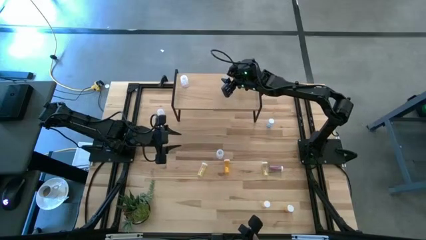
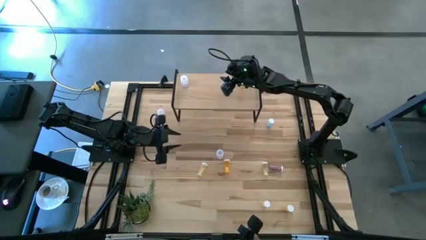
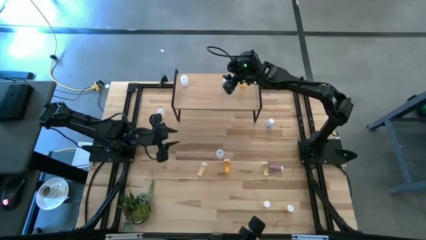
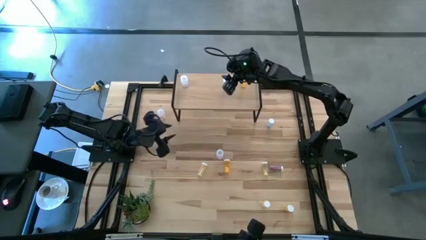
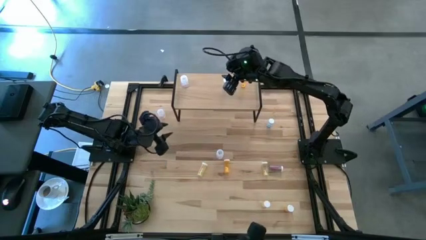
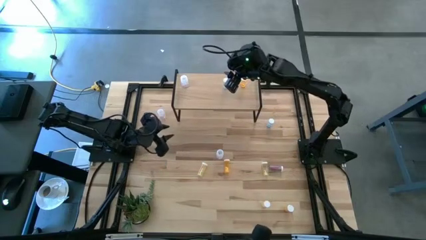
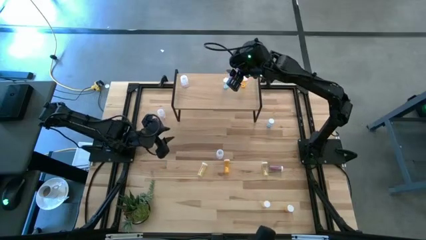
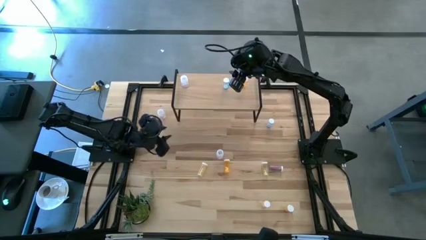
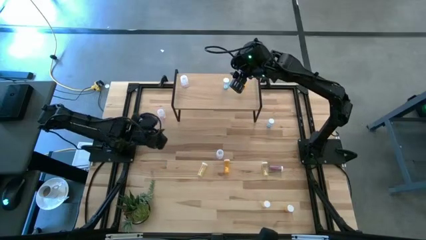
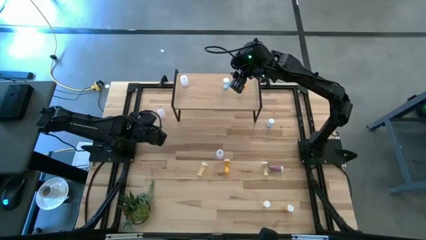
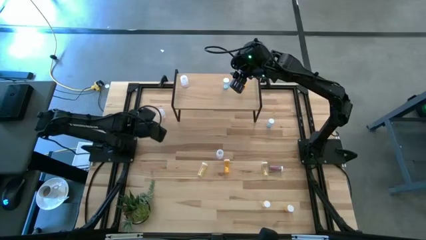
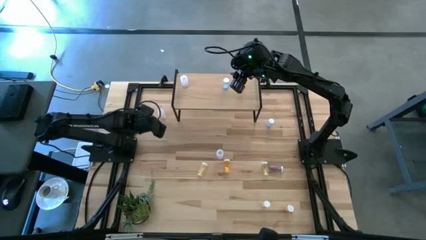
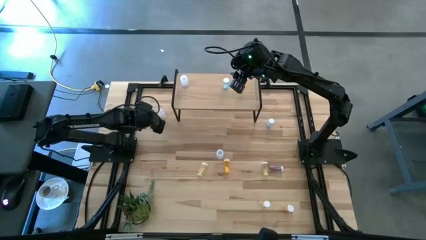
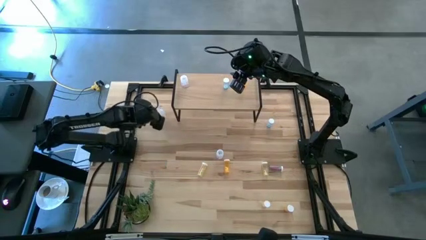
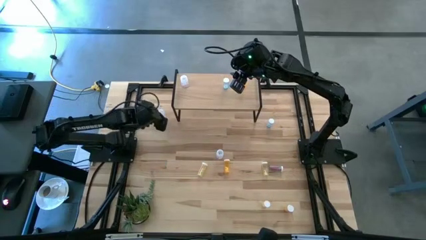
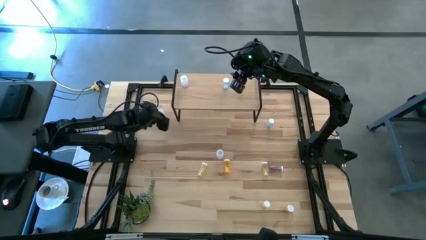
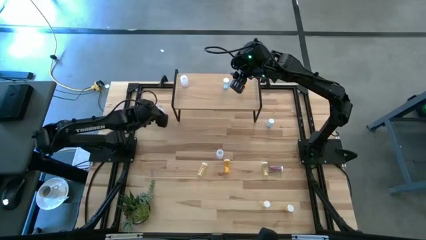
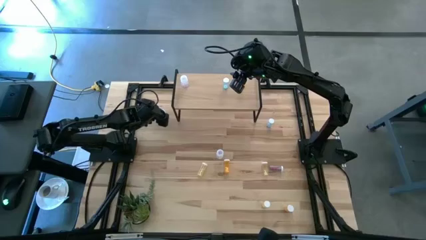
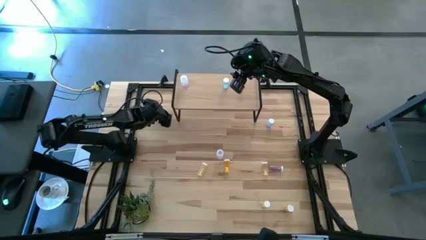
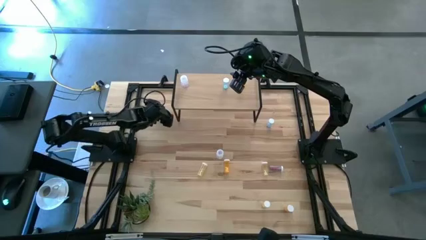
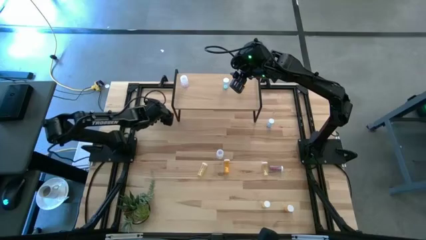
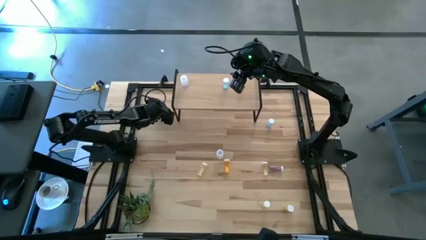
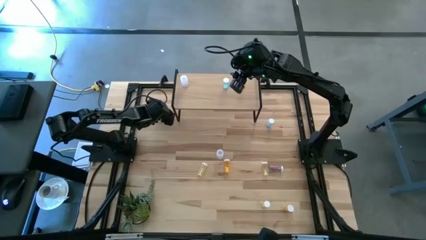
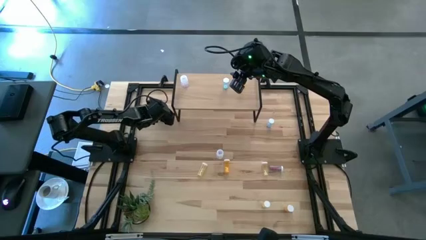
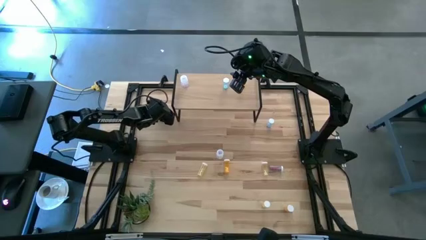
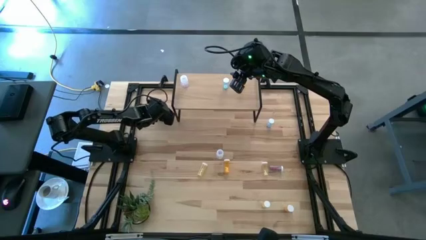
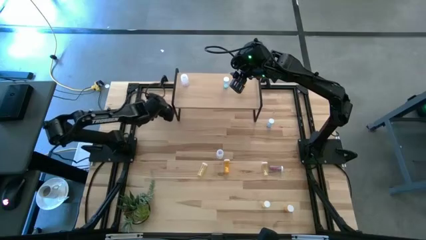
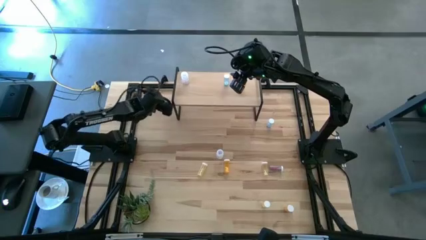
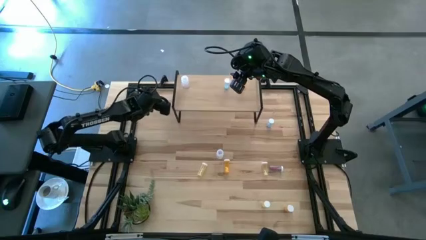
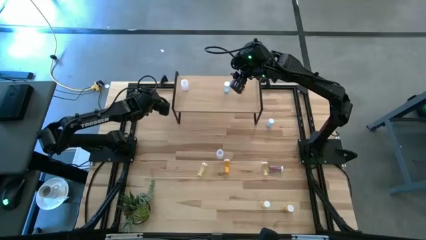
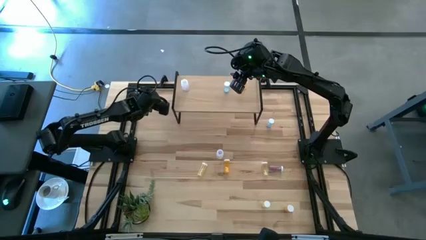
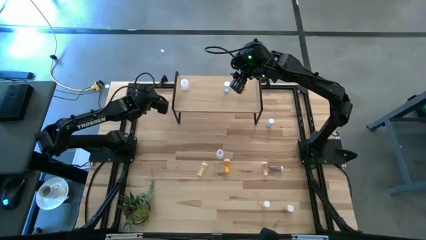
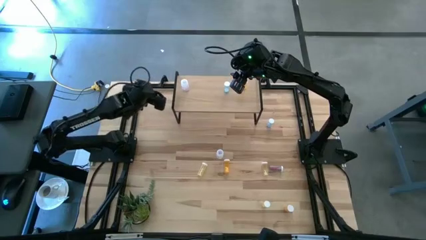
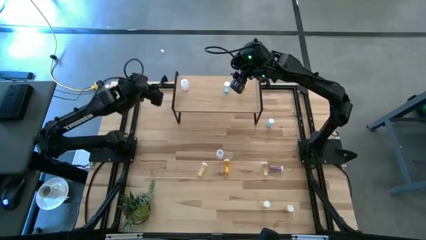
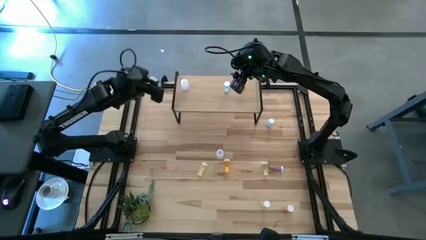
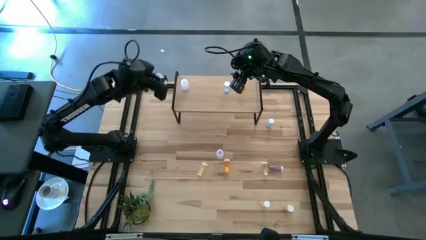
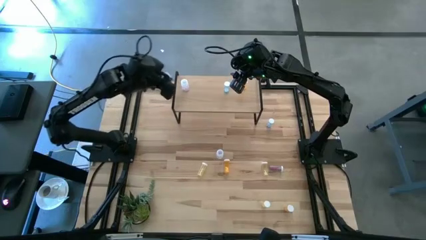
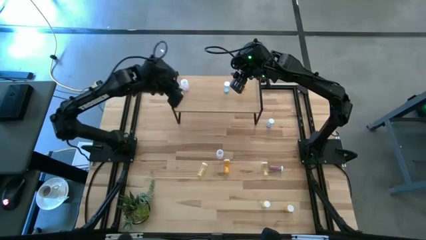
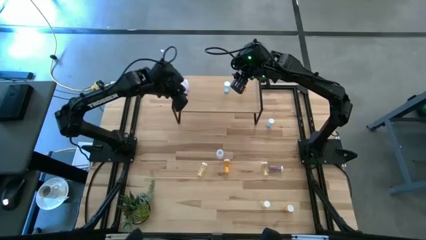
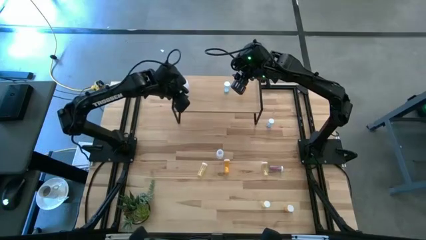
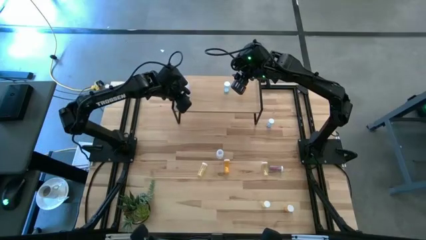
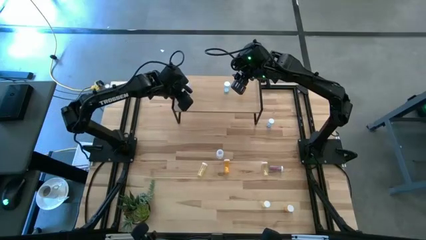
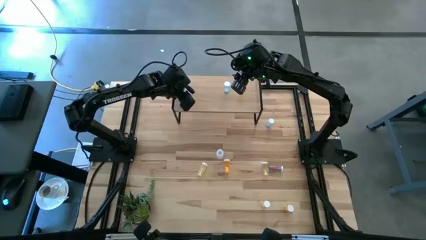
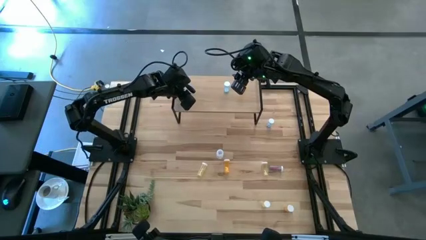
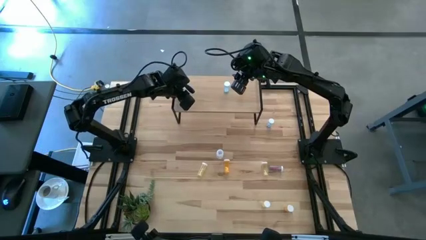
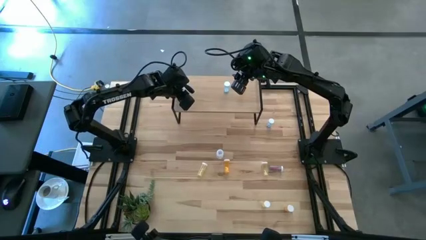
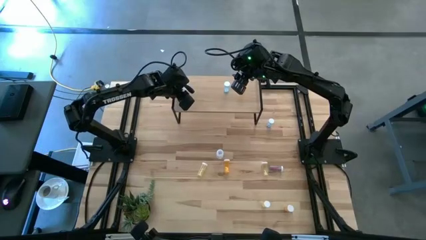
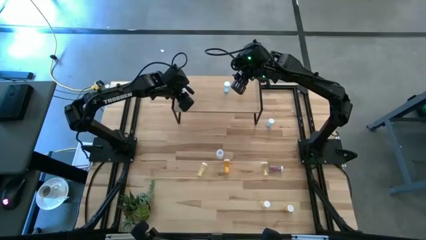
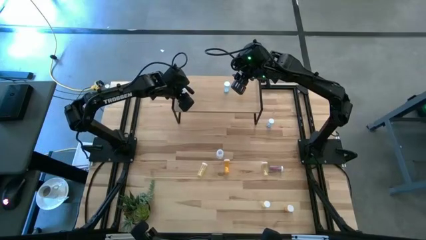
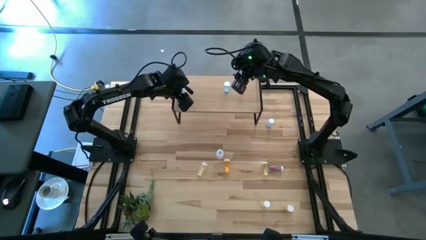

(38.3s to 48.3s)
Task: Pick and place medicine bottles onto shelf by color
Put the top transparent pill bottle on the shelf aligned with the other transparent pill bottle

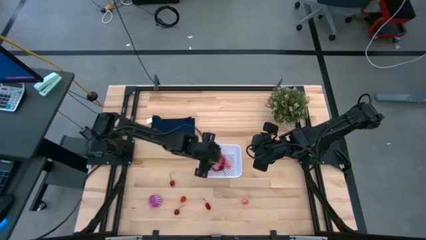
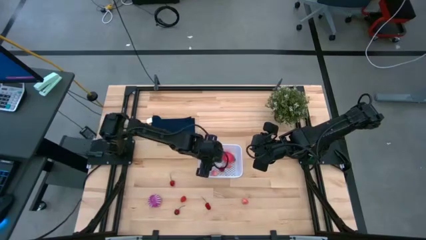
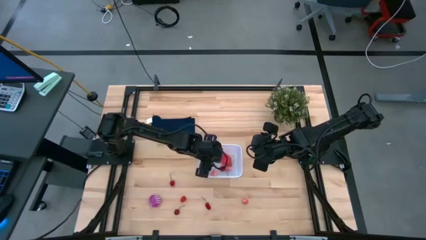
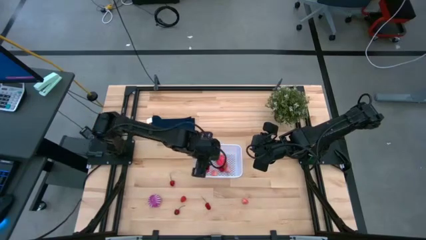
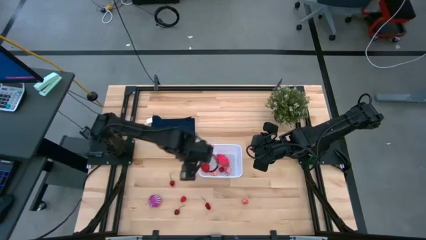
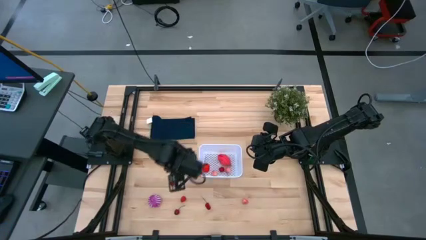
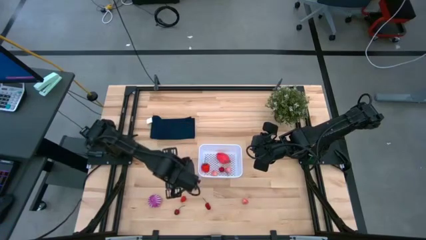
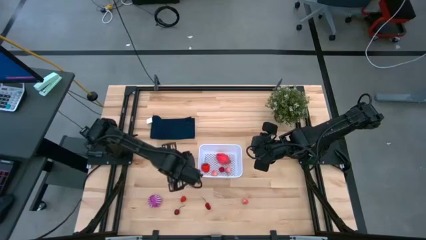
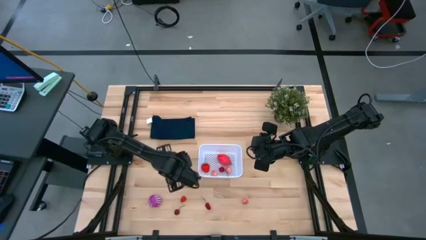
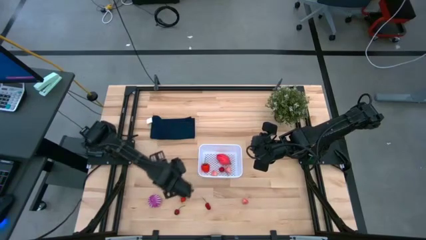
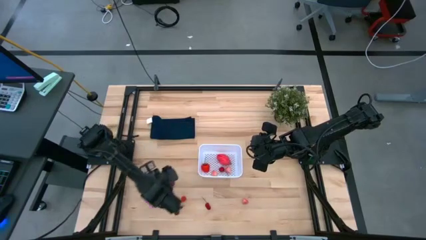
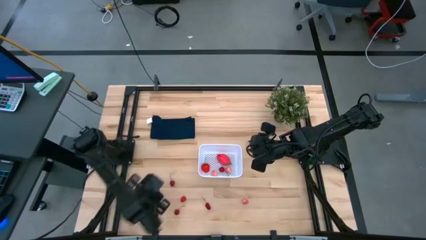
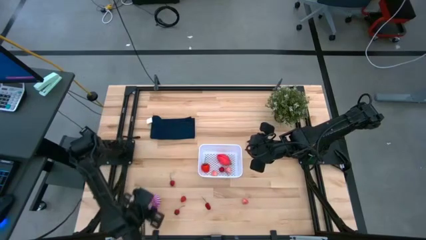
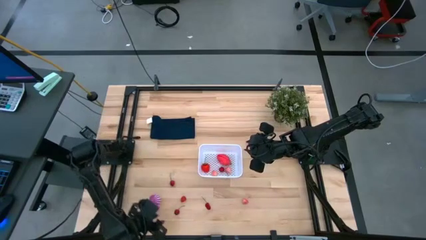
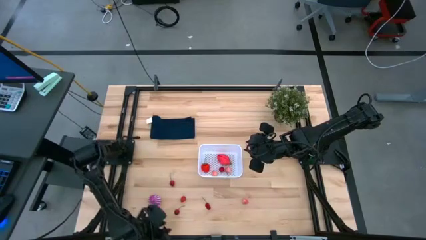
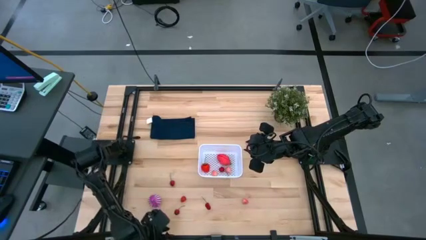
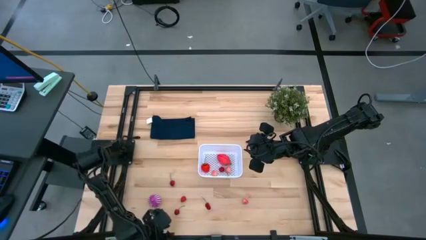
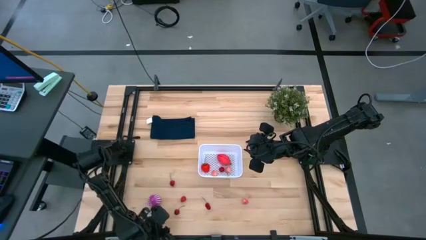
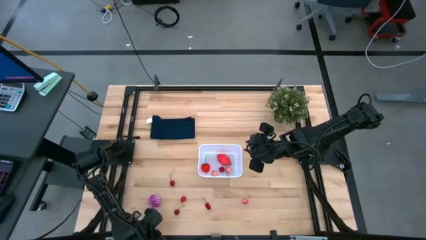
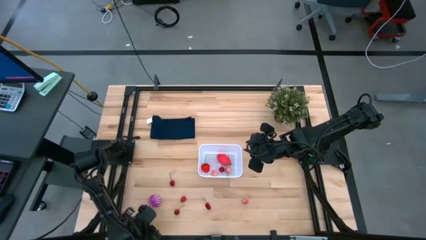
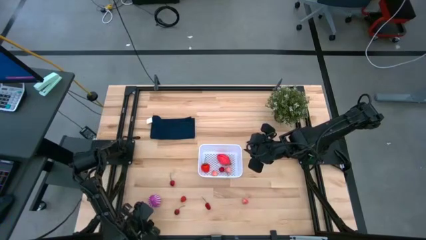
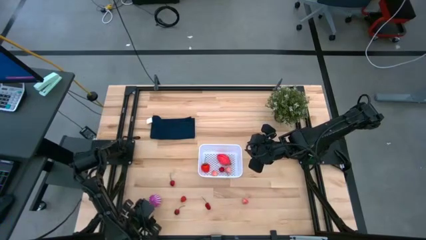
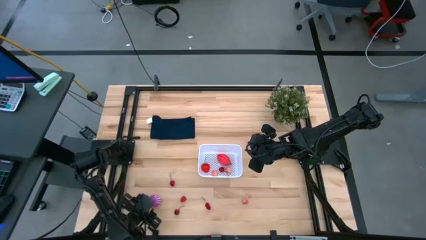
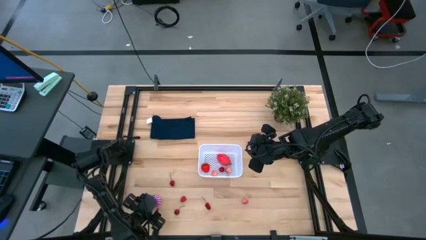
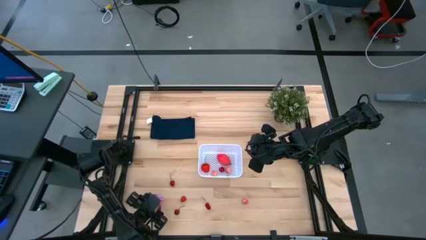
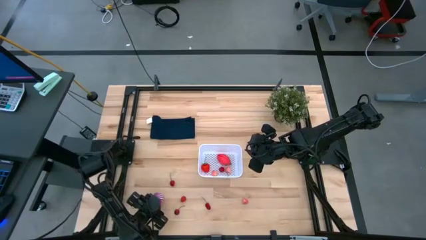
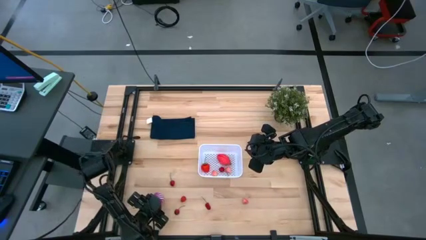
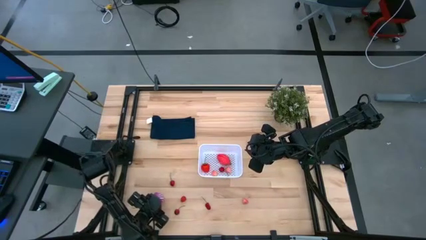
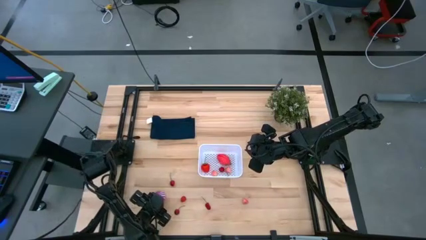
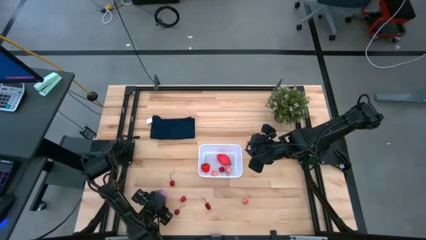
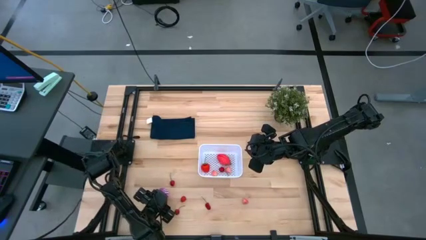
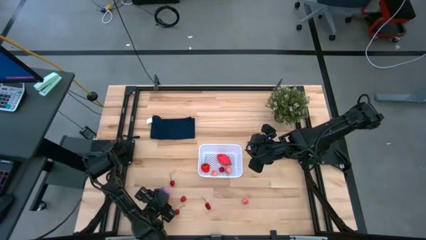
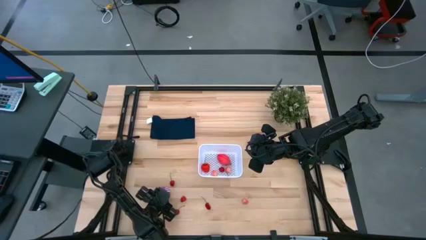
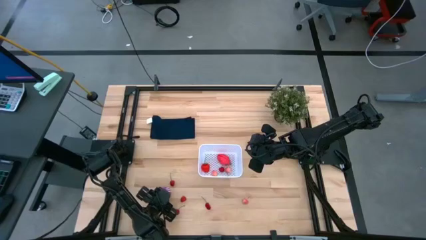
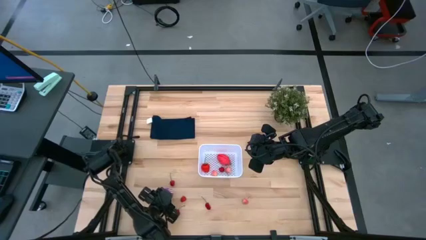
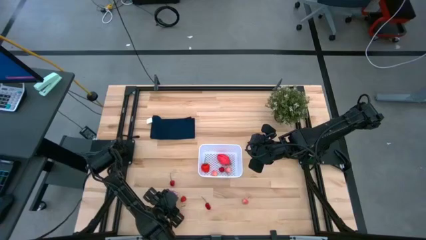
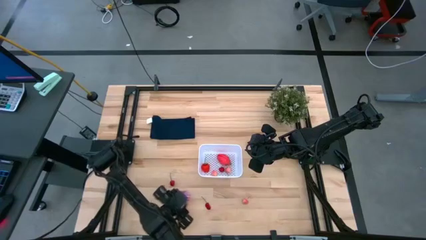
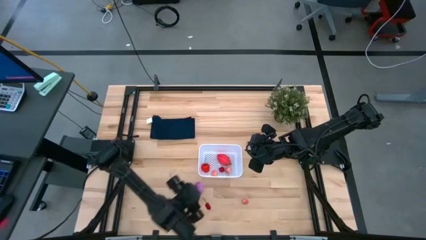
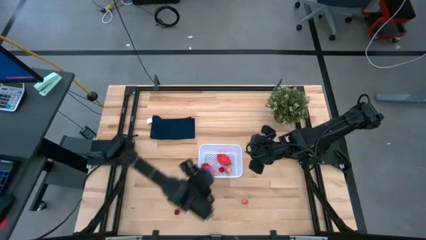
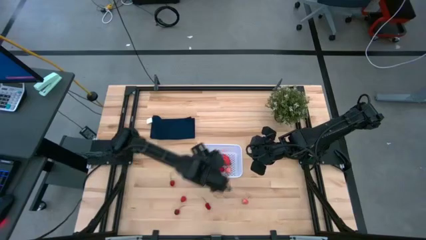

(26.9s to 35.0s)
Task: Pick and placing Produce into tupperware
Put the onion into the white bin
